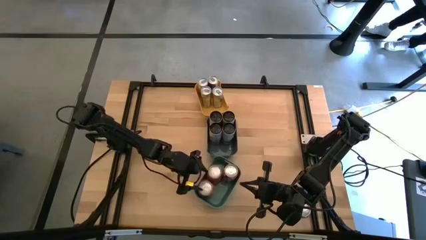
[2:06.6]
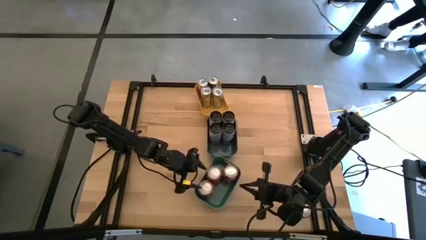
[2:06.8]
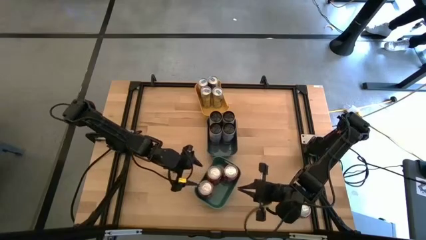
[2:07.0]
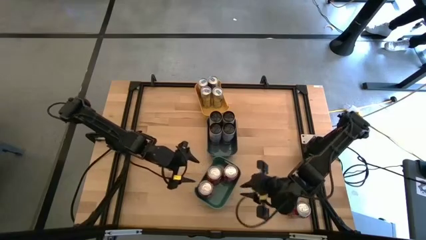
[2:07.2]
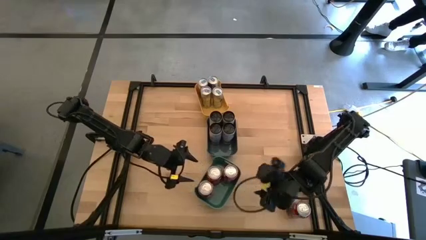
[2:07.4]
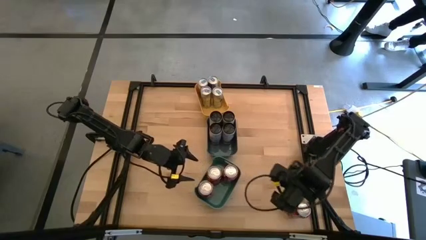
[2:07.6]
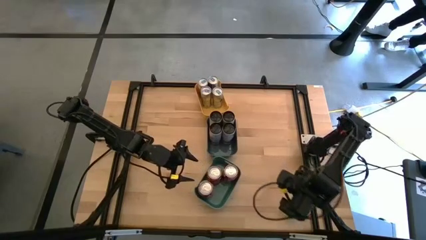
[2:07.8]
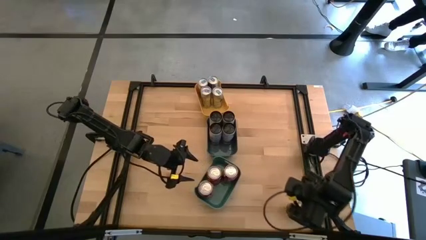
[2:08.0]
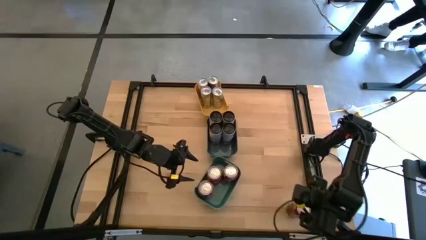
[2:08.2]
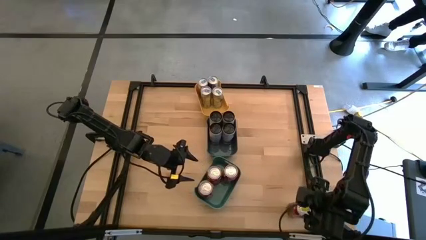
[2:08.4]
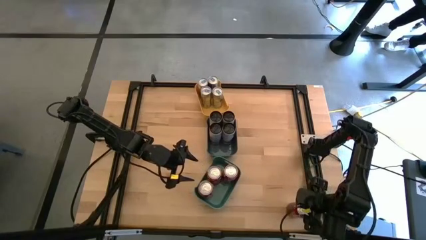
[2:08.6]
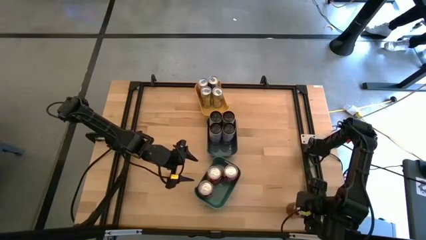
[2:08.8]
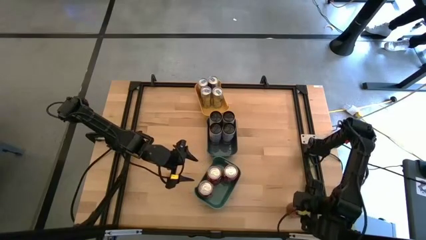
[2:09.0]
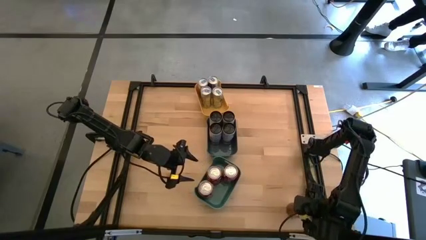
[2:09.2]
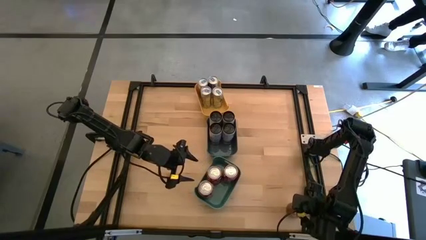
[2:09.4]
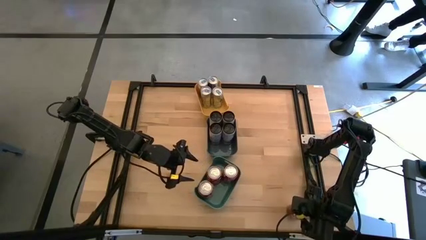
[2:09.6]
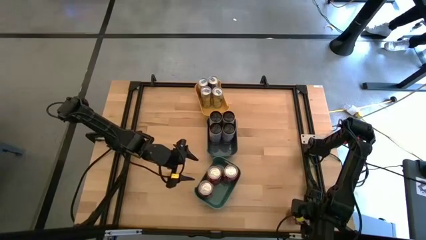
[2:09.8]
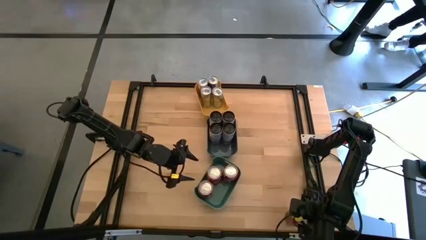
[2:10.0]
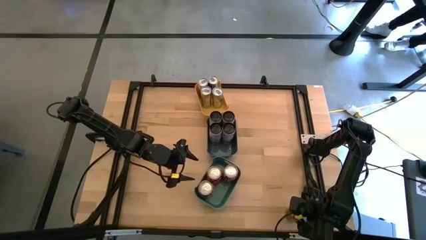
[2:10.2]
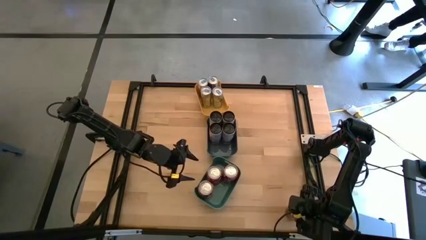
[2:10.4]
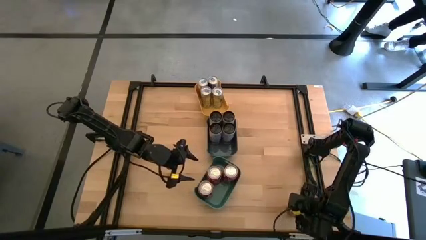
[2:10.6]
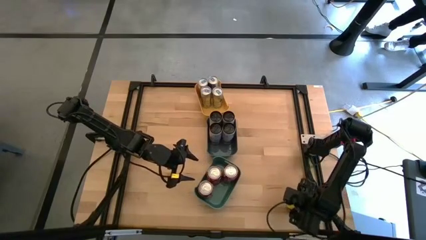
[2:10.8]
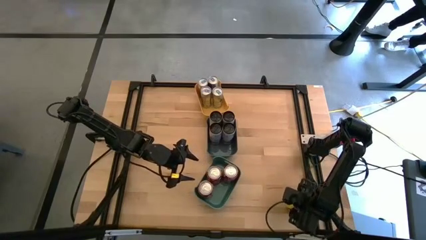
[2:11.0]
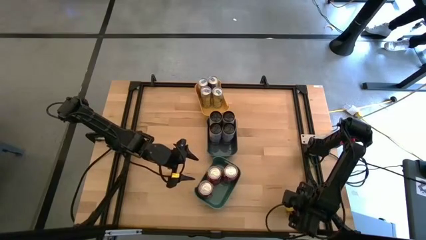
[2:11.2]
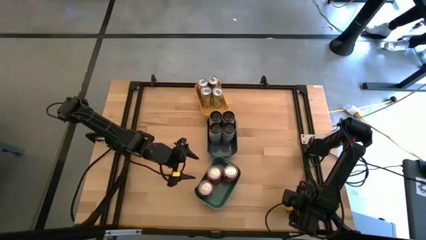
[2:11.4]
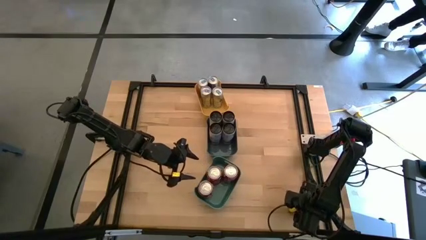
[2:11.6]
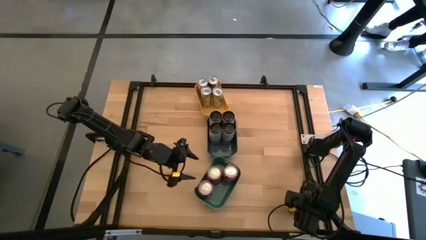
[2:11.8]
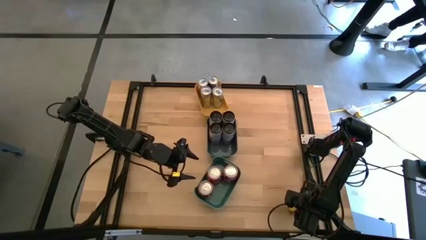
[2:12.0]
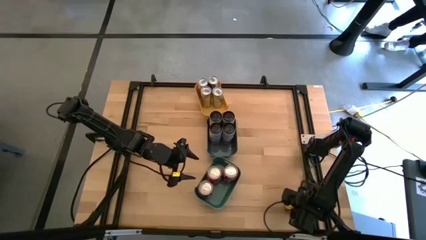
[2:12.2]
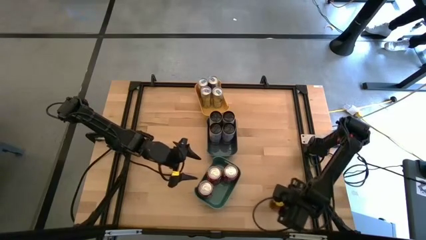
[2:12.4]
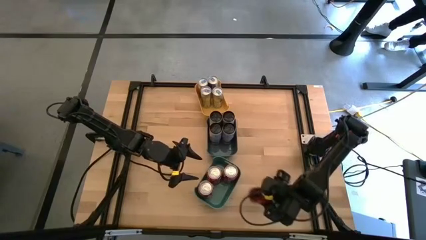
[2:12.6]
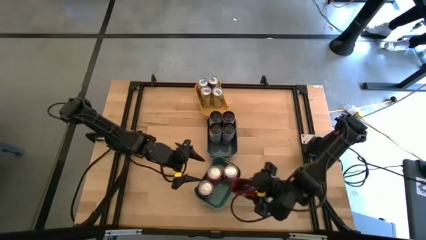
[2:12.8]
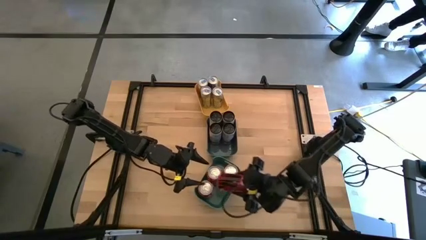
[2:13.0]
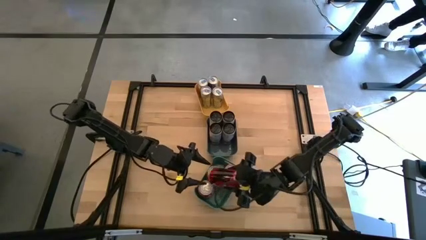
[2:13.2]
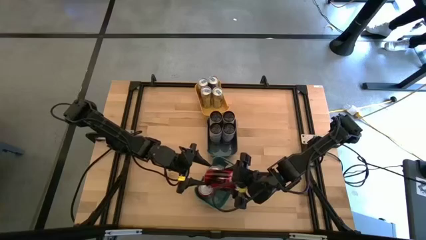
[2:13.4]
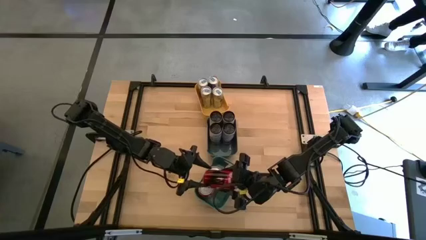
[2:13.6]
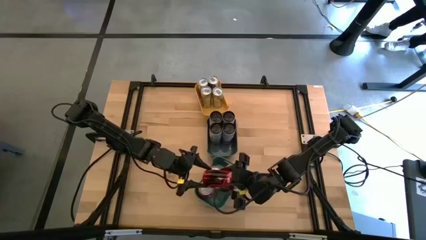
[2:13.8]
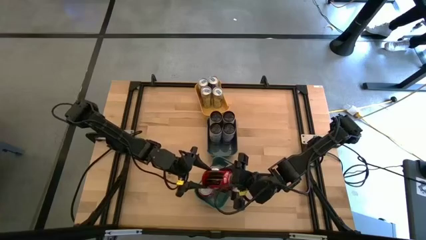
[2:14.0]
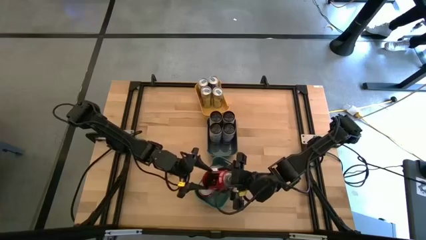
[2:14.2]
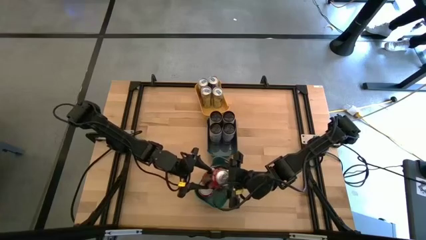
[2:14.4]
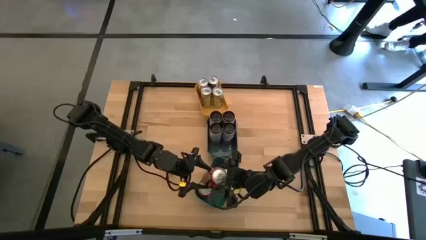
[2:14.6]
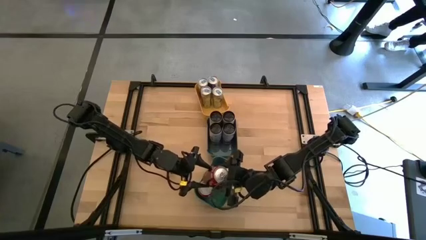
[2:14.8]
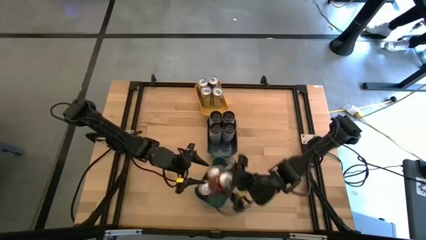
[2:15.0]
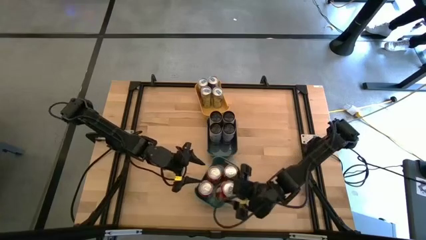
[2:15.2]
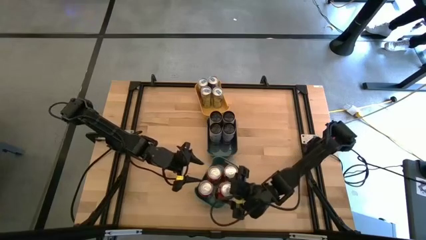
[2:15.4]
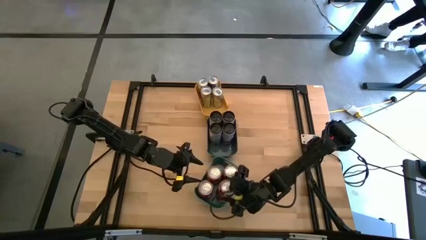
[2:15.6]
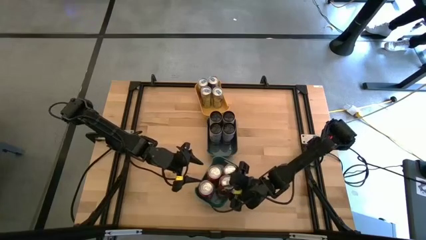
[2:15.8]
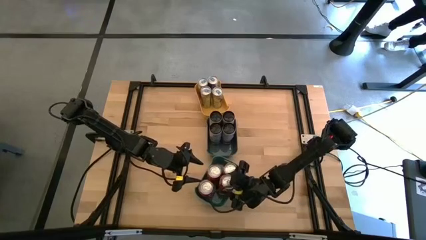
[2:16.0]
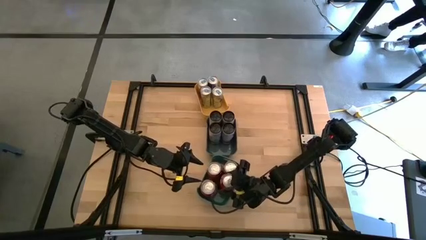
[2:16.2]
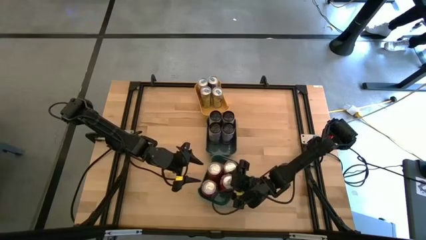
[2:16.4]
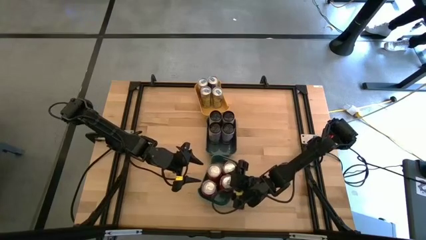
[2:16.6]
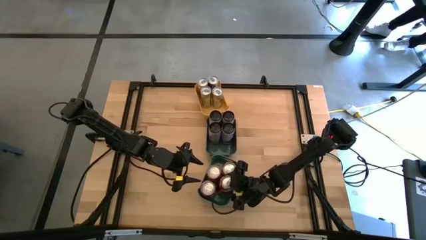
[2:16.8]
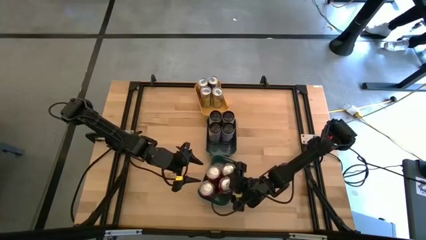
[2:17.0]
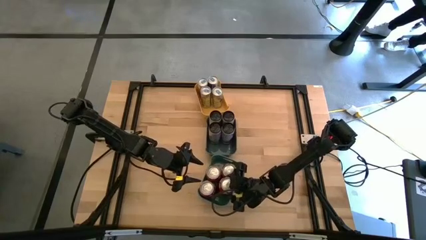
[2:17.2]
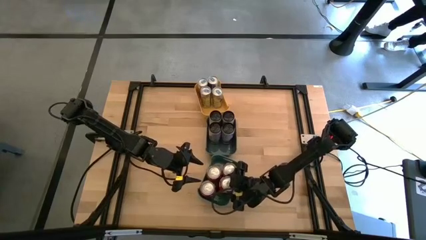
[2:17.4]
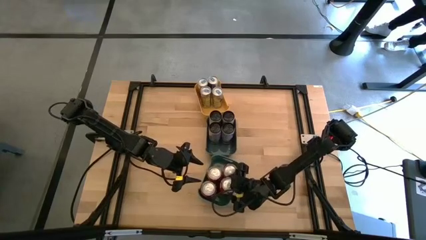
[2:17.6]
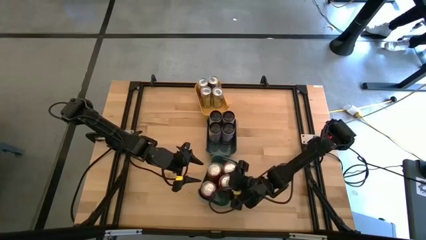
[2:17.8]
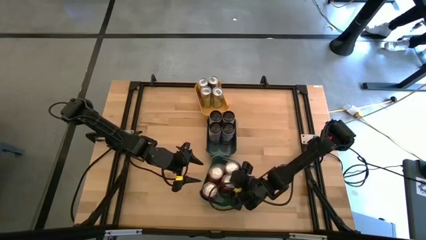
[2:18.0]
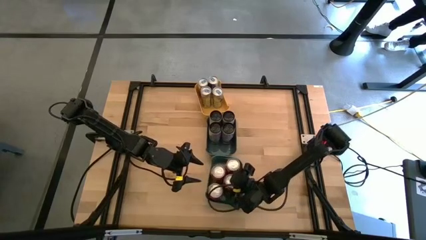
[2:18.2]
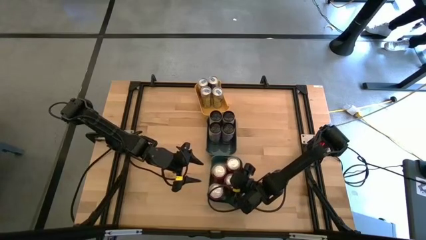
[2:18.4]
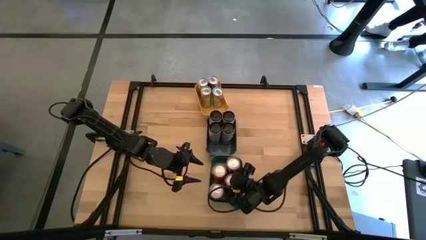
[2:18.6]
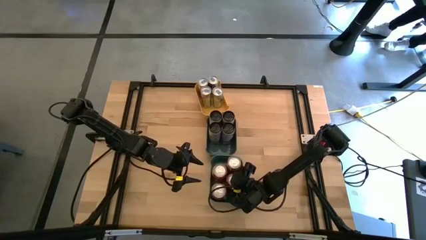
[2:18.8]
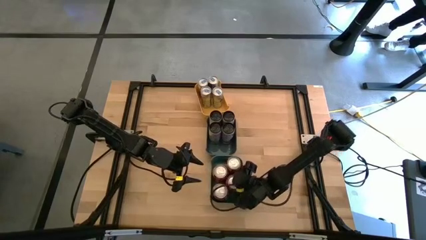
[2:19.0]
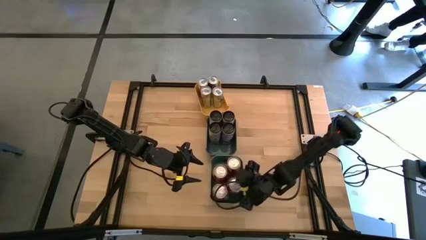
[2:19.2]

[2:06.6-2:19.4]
Task: Sort soda cans
Put the right red soda can into the green bin
